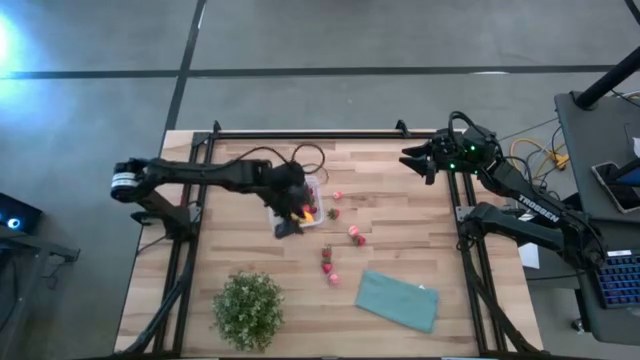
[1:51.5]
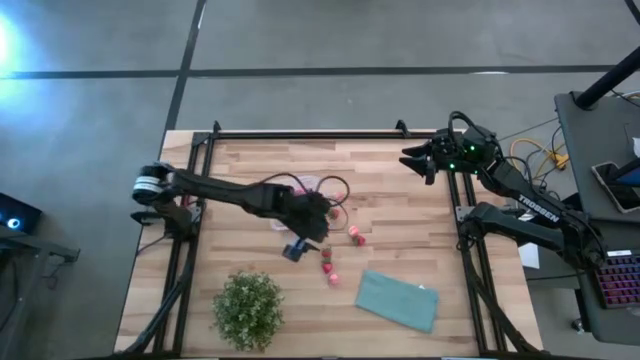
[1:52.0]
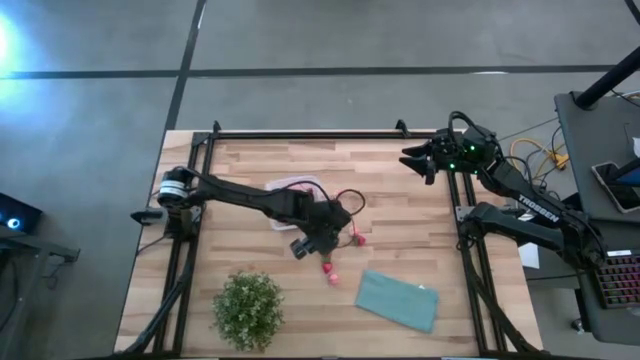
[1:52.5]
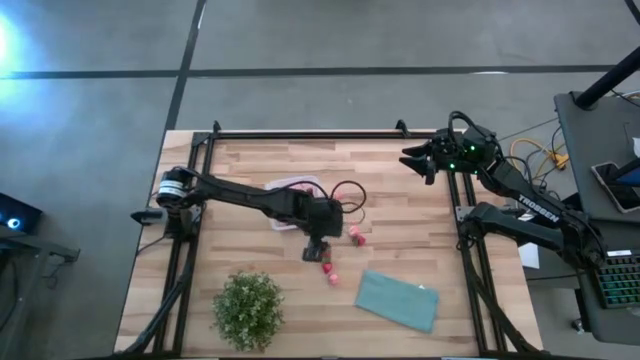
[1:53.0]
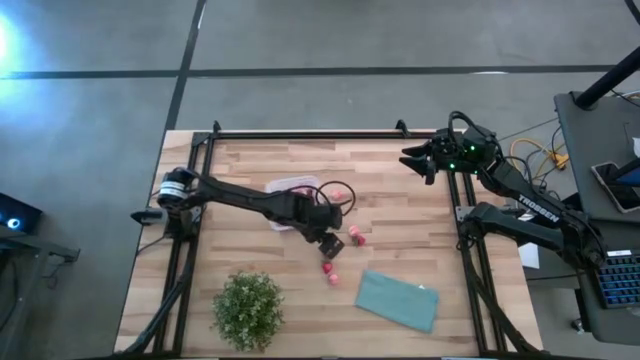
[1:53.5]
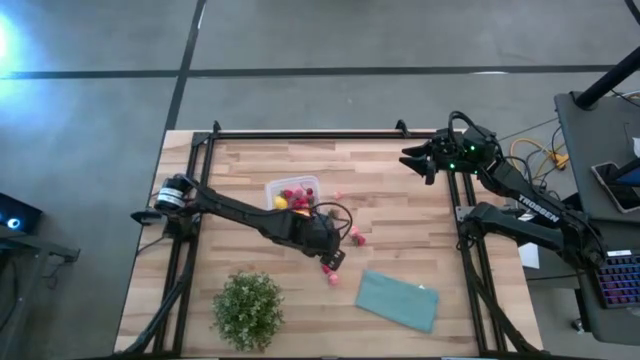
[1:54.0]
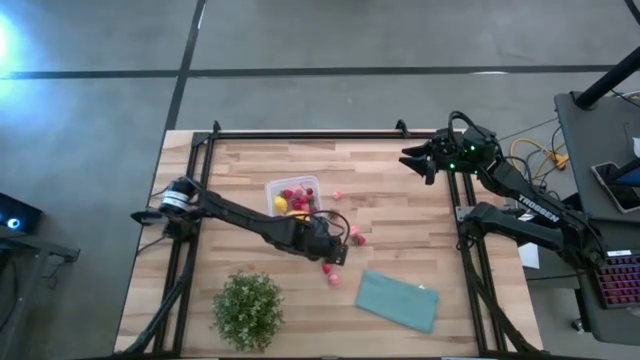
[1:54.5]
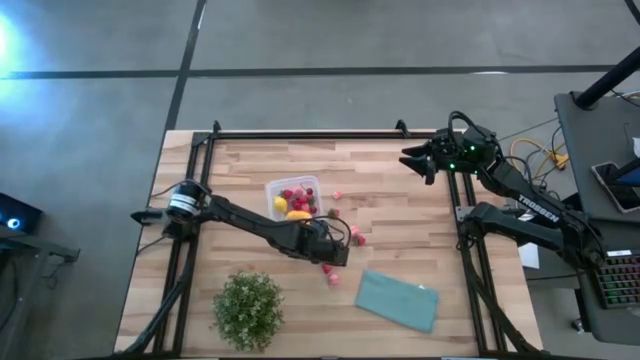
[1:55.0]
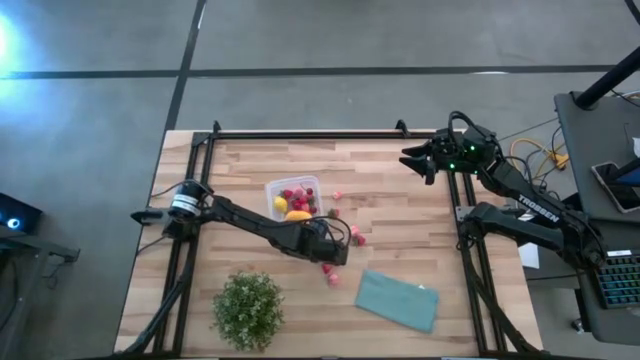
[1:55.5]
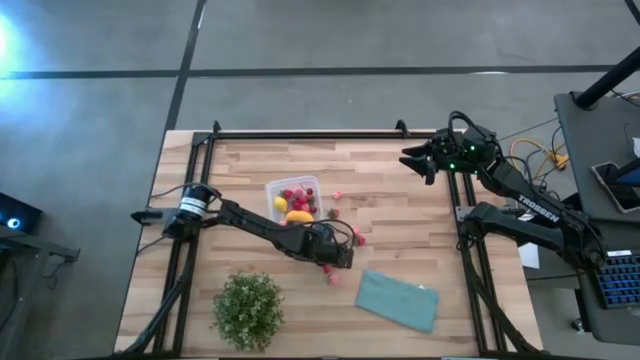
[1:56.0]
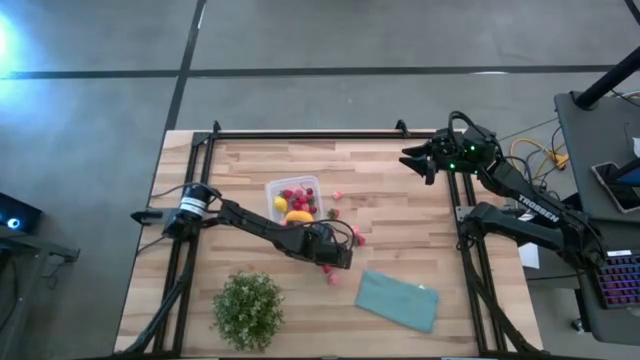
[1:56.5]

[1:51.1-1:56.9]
Task: Pick and placing Produce into tupperware
Put the red strawberry into the transparent bin

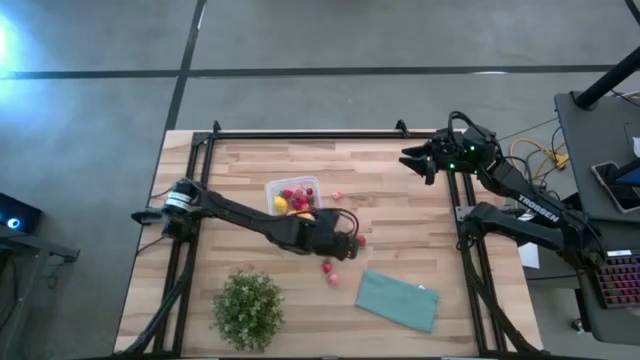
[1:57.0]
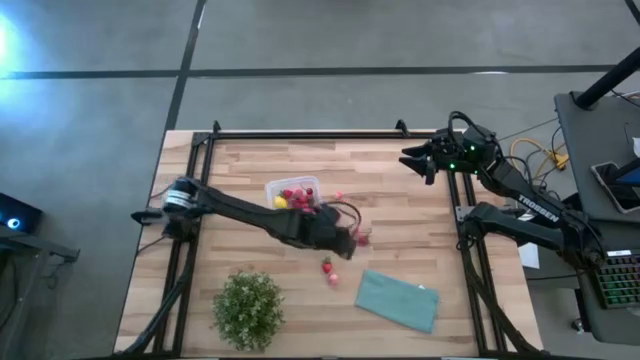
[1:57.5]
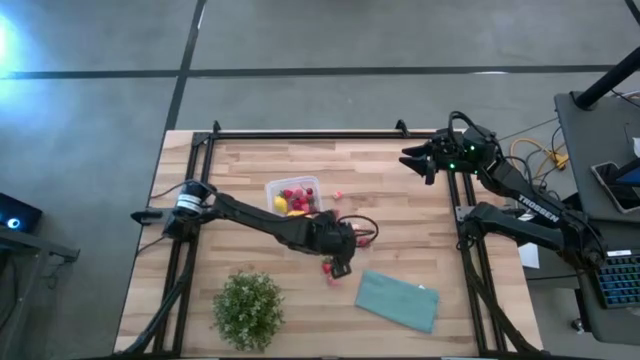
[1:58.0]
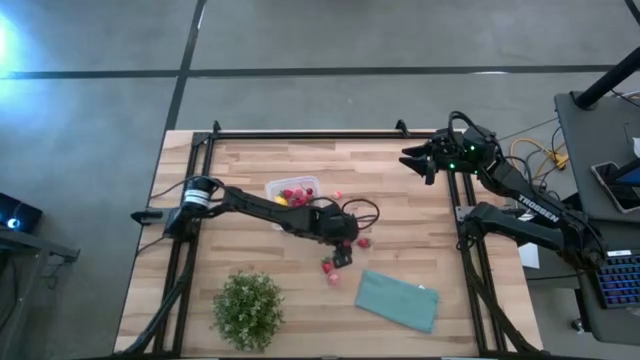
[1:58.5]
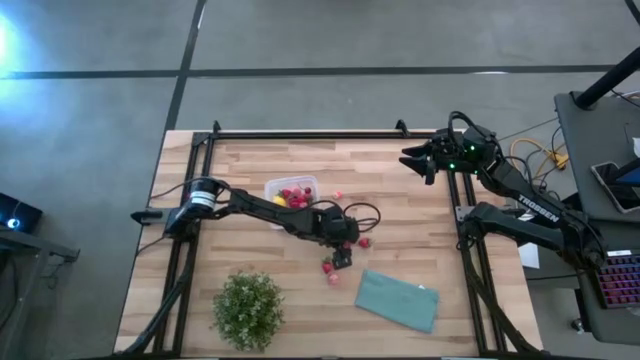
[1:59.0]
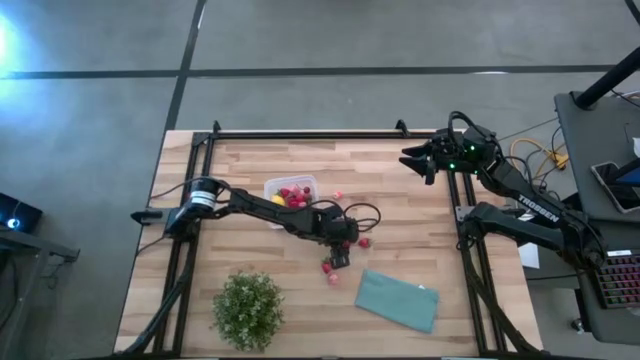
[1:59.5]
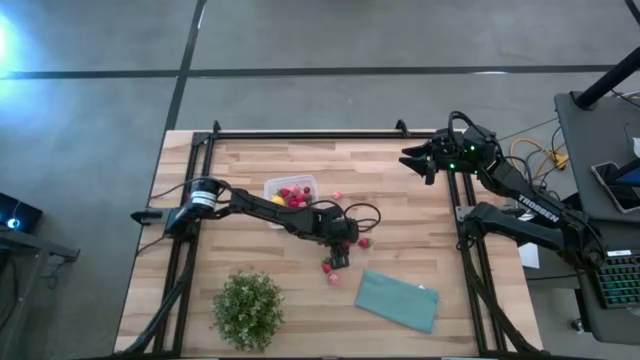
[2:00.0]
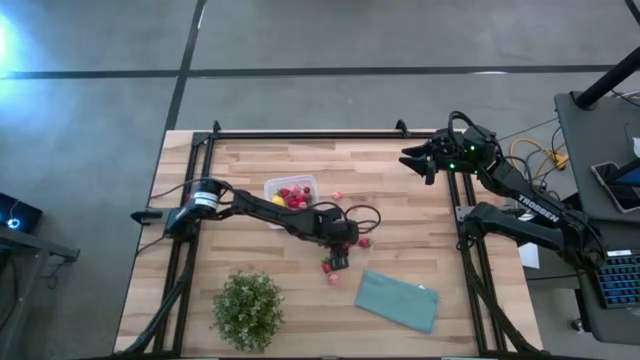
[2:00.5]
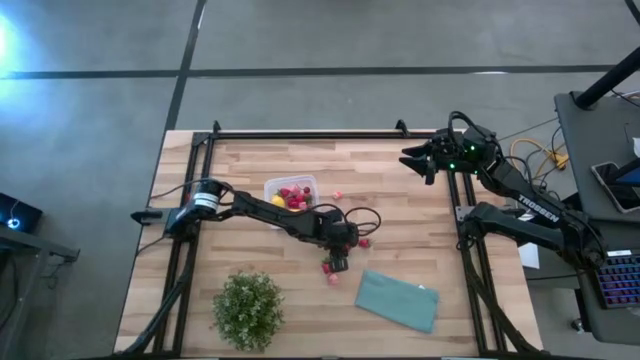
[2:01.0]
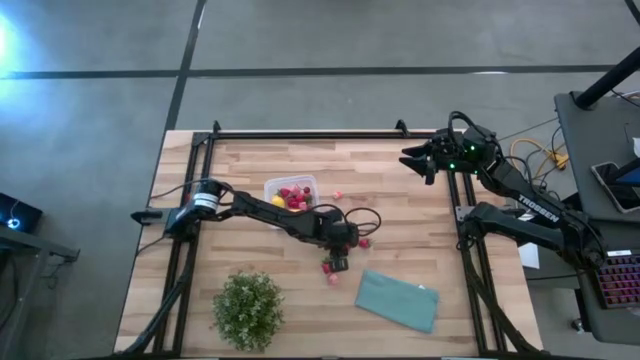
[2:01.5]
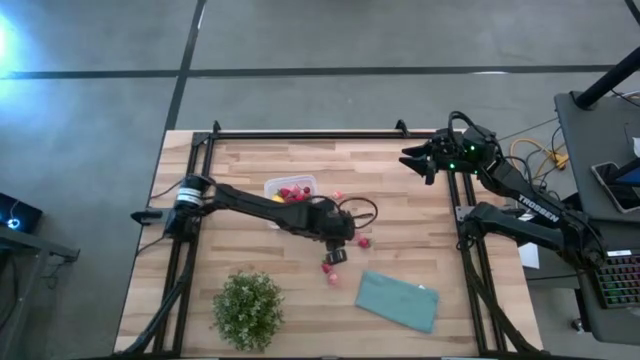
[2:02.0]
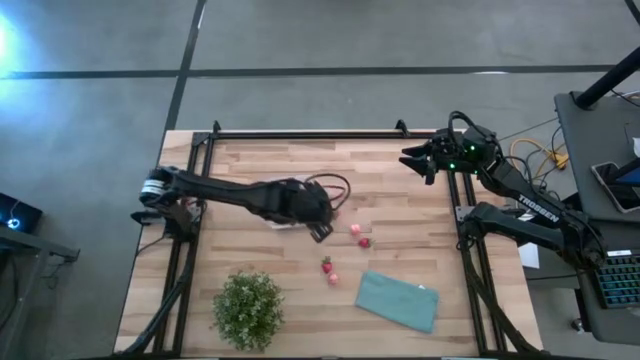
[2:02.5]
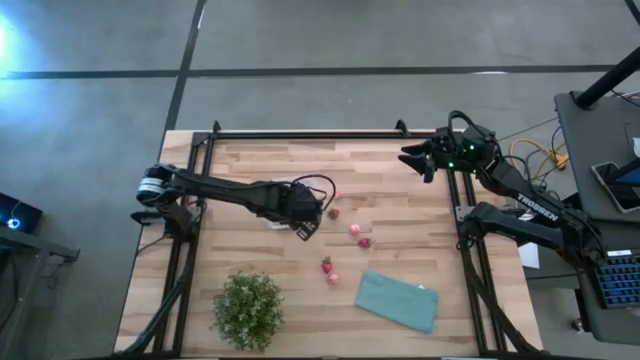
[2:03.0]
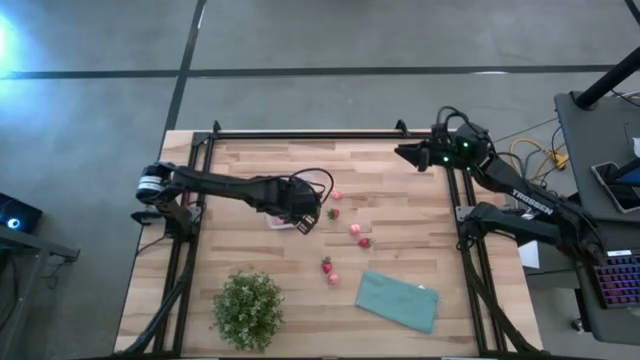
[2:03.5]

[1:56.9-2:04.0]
Put the red strawberry into the transparent bin

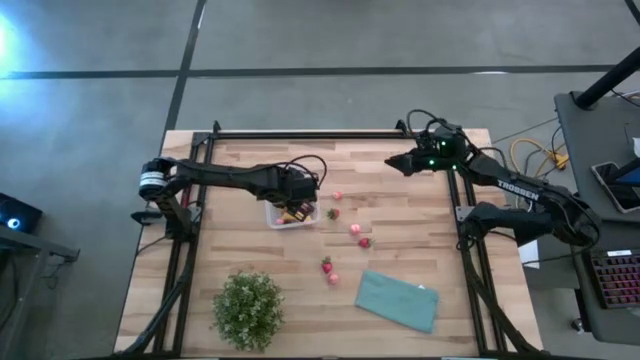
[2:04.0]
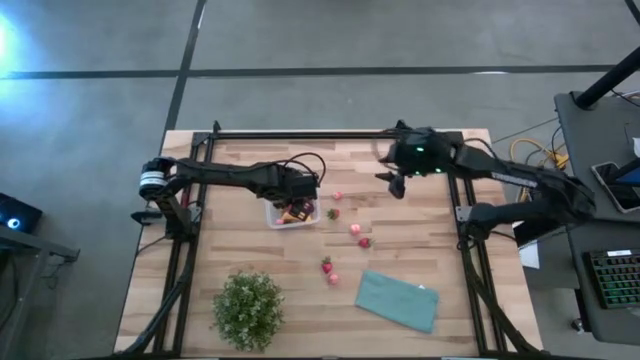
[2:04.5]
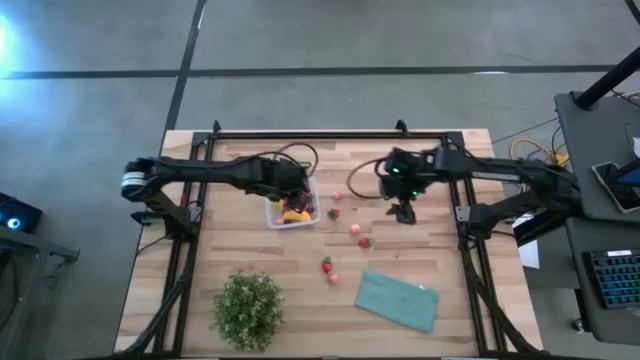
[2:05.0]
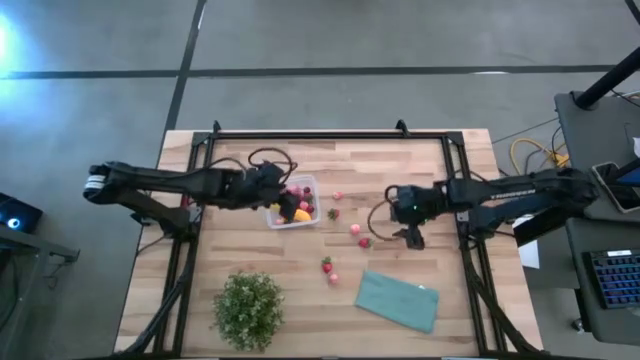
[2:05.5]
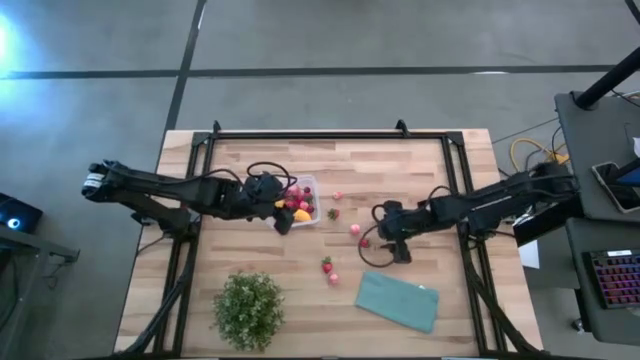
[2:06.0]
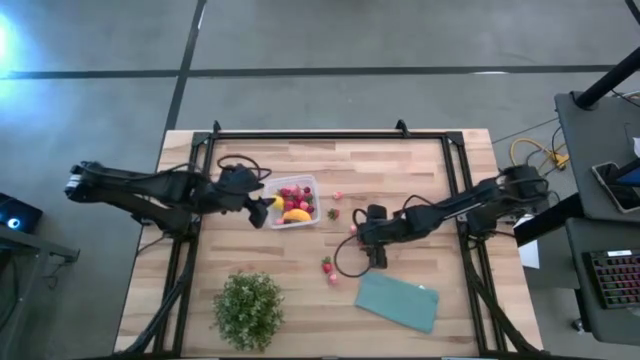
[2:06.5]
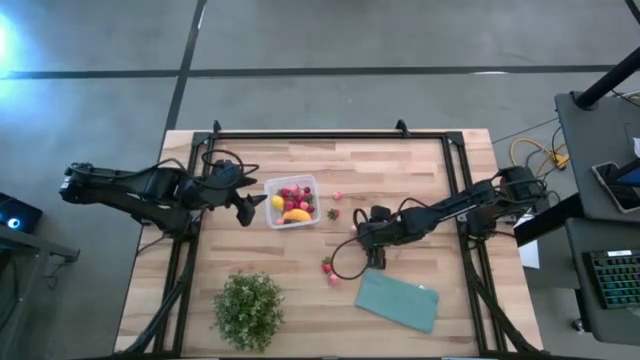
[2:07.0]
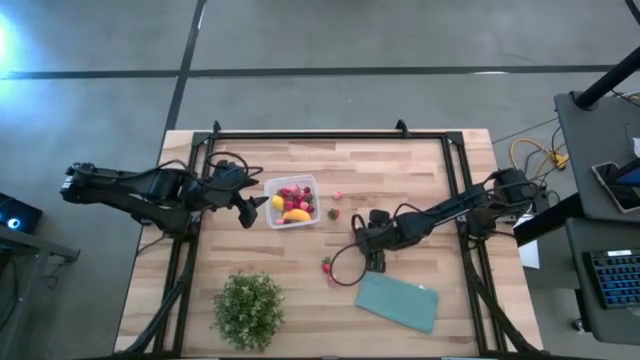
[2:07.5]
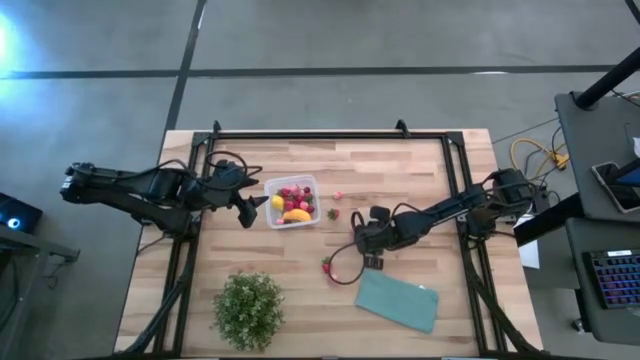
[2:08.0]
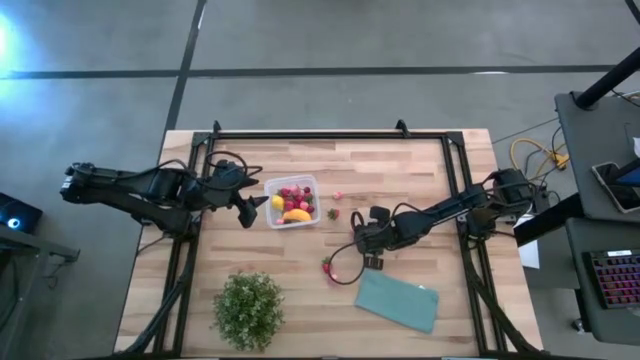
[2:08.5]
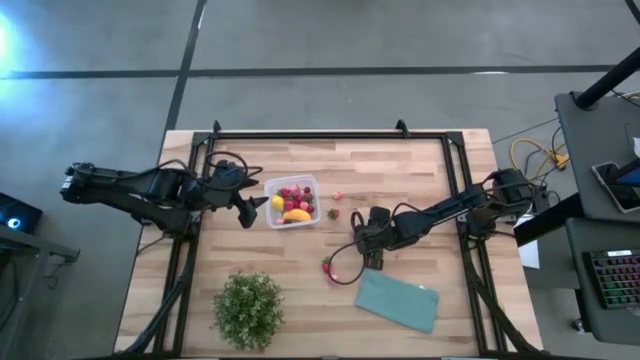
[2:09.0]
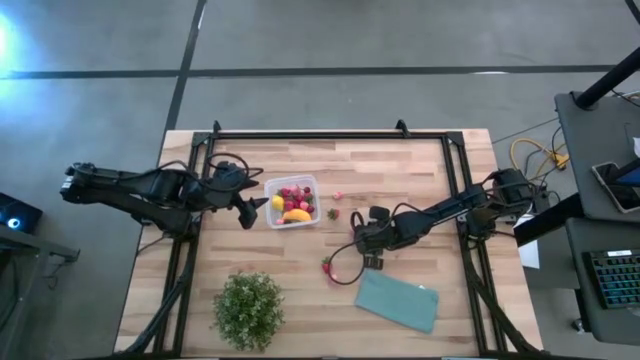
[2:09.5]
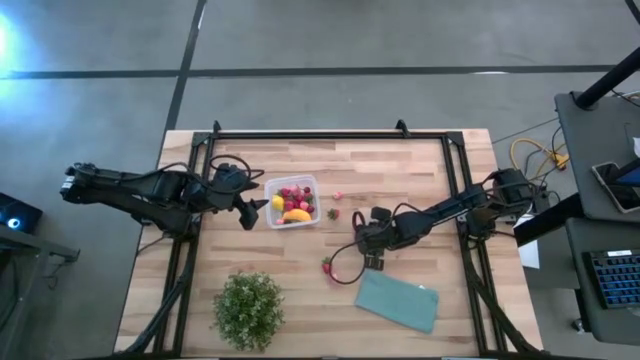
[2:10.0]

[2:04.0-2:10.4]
Put the red strawberry into the transparent bin

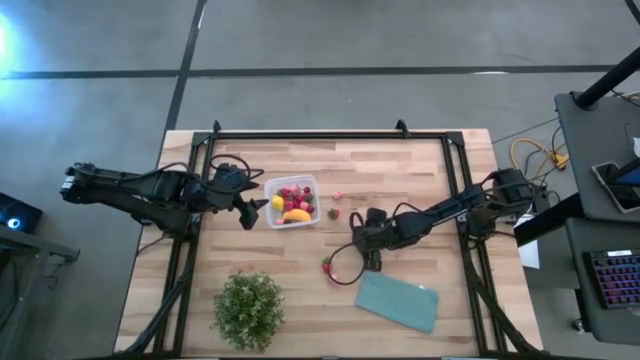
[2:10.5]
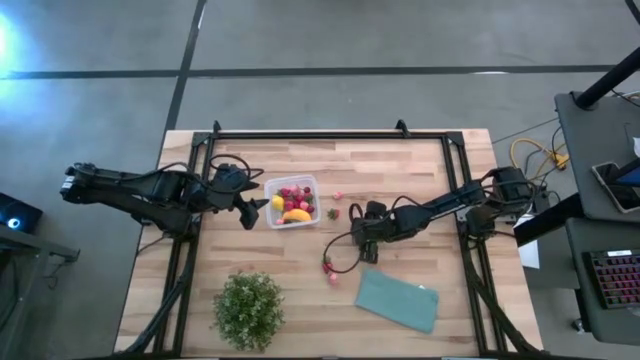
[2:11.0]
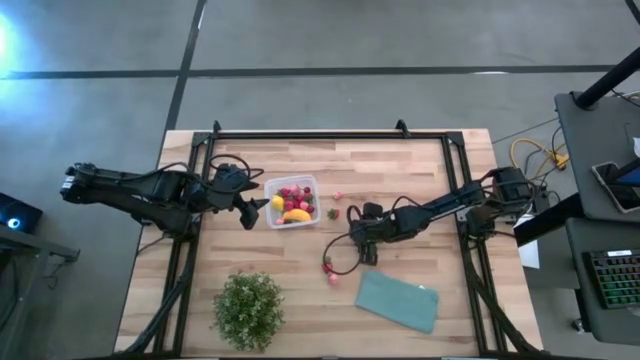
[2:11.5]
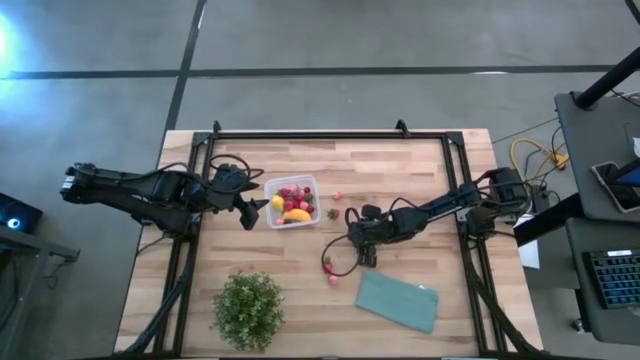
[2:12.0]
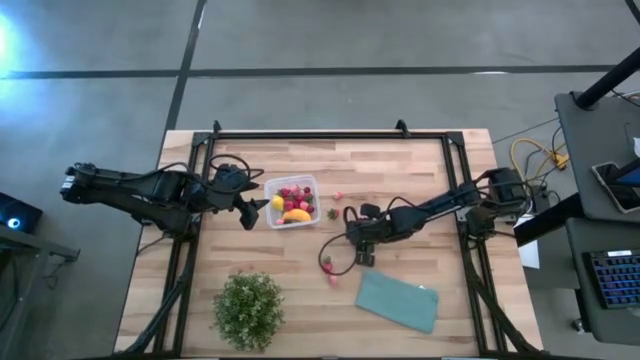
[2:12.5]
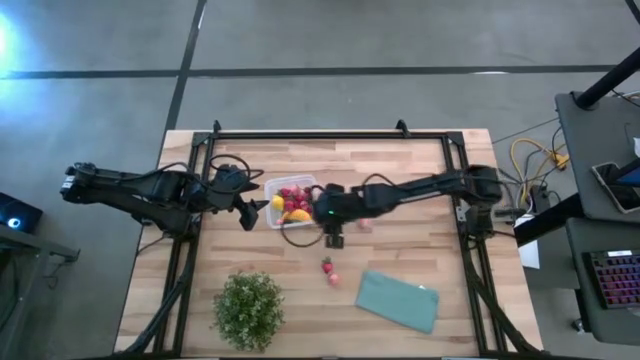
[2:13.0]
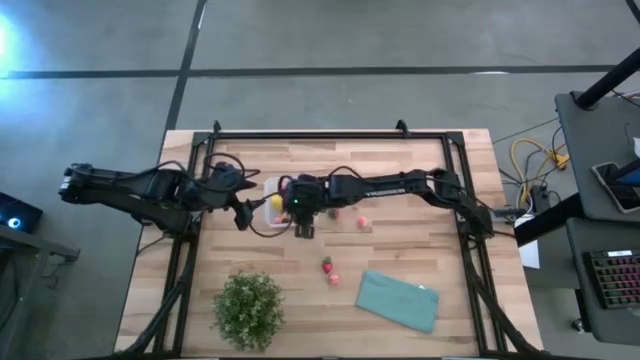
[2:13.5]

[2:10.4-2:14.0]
Put the red strawberry into the transparent bin
